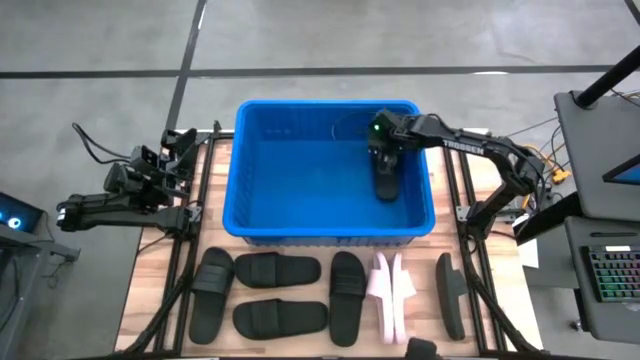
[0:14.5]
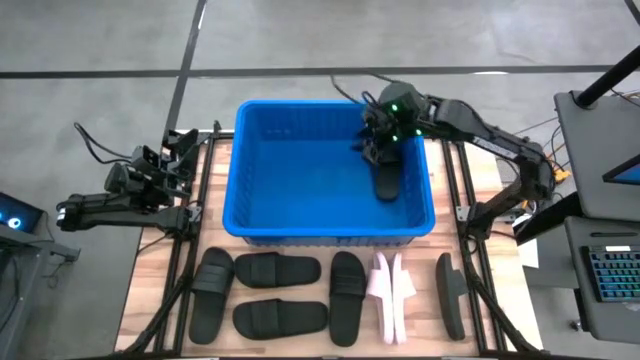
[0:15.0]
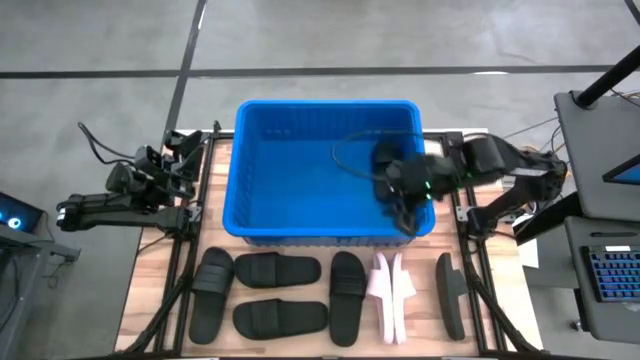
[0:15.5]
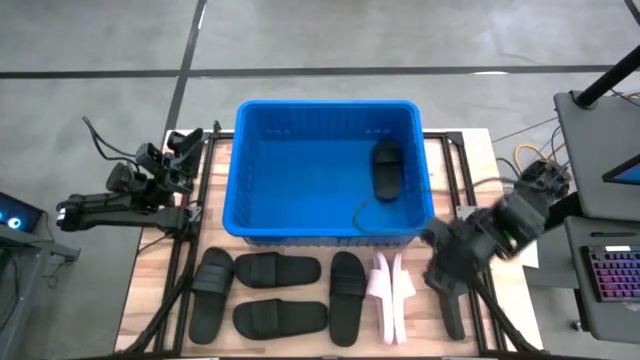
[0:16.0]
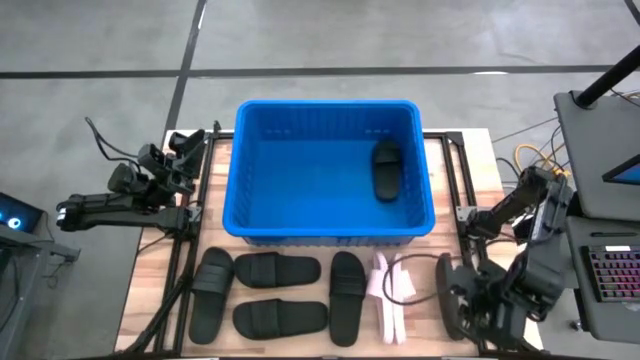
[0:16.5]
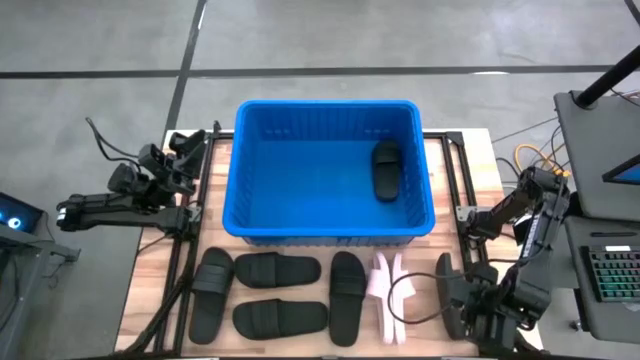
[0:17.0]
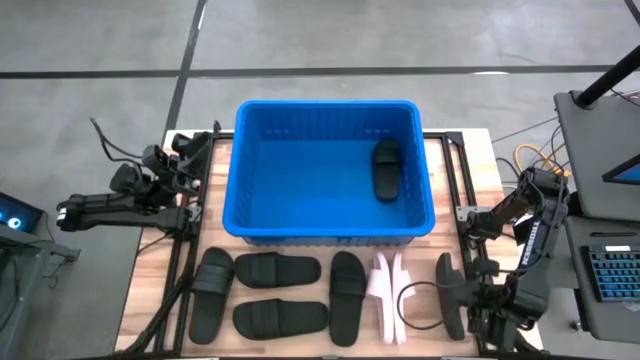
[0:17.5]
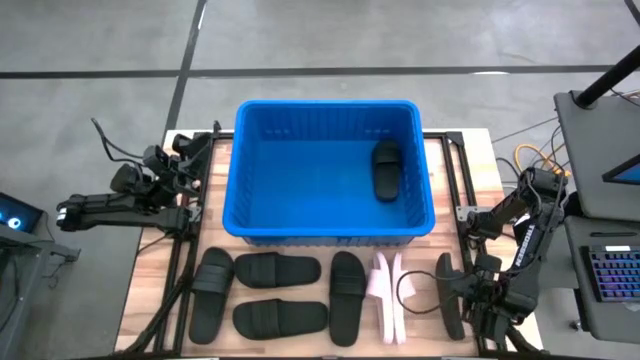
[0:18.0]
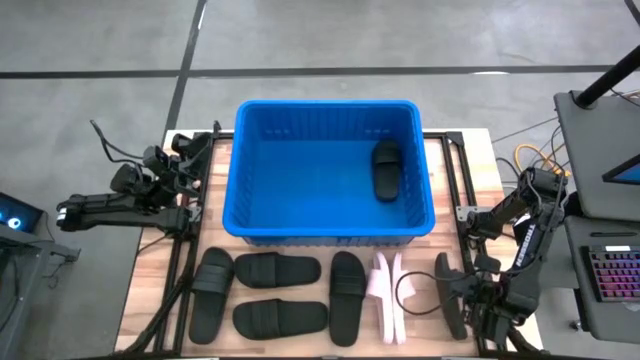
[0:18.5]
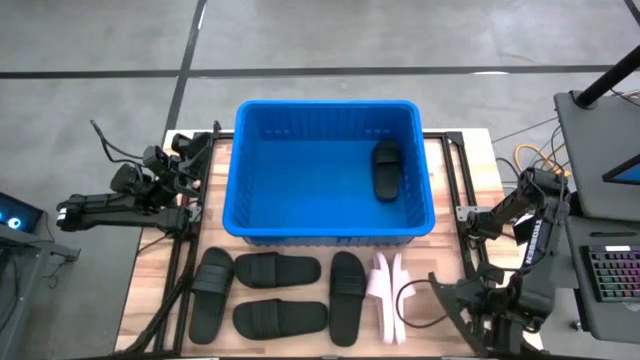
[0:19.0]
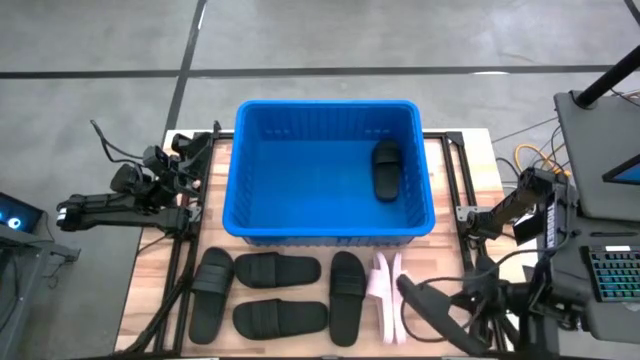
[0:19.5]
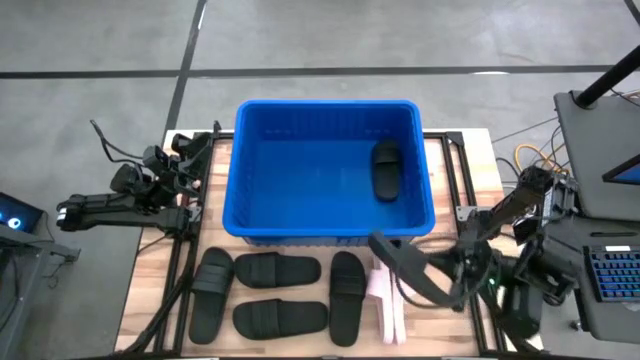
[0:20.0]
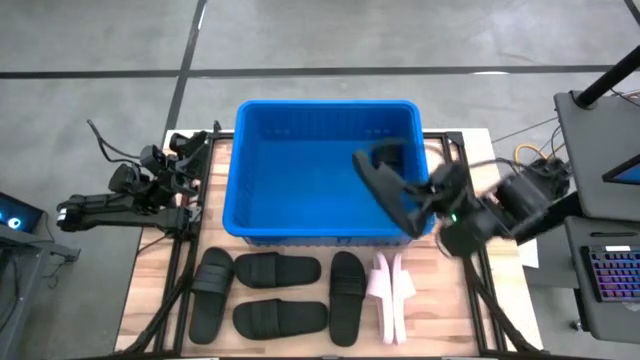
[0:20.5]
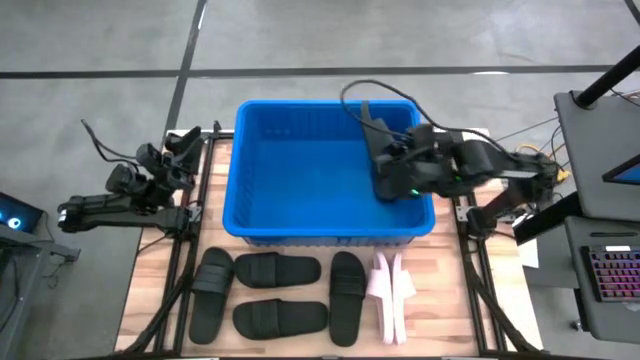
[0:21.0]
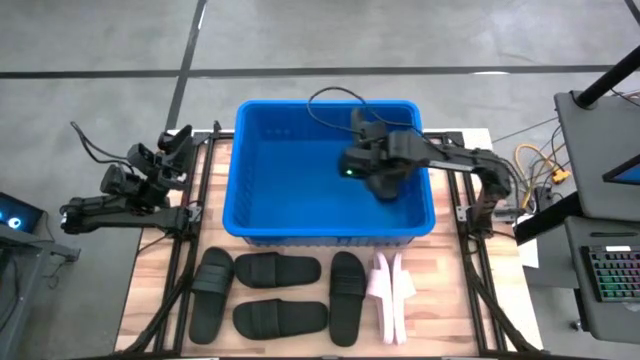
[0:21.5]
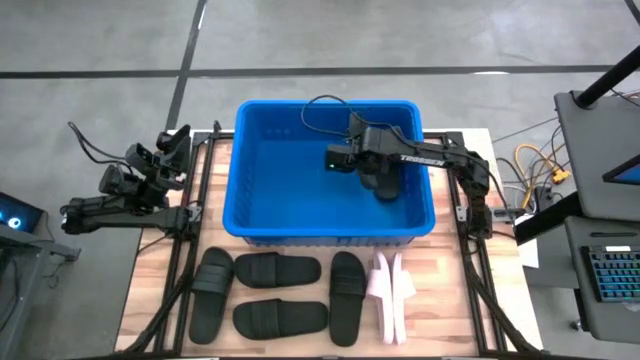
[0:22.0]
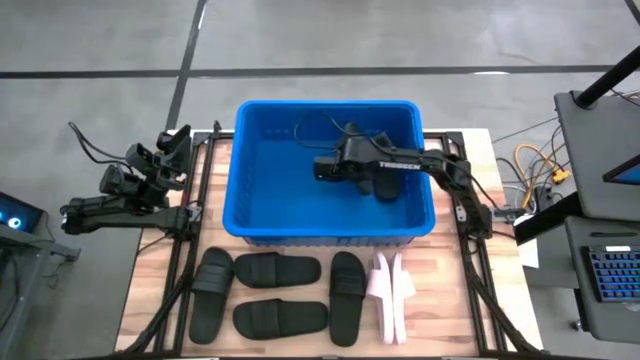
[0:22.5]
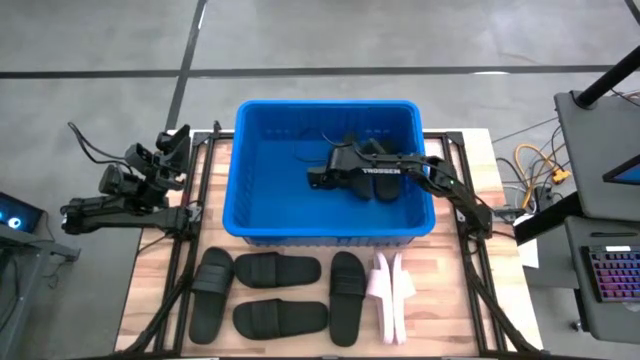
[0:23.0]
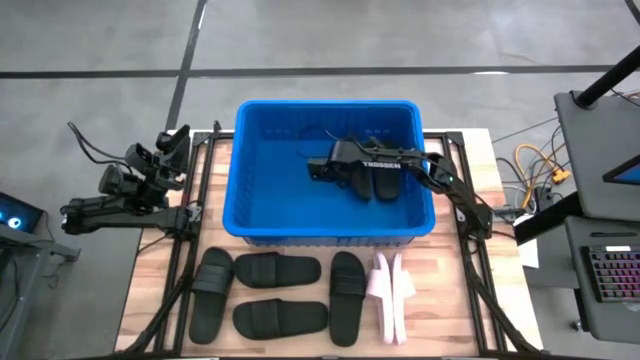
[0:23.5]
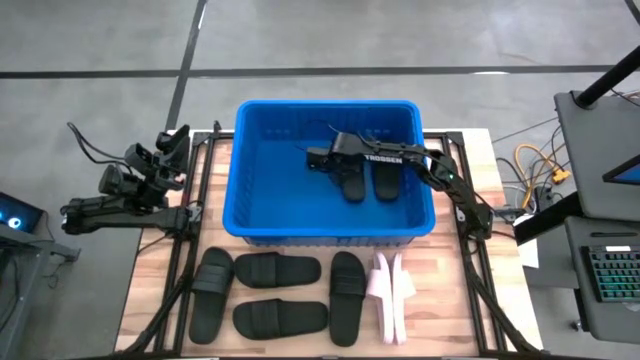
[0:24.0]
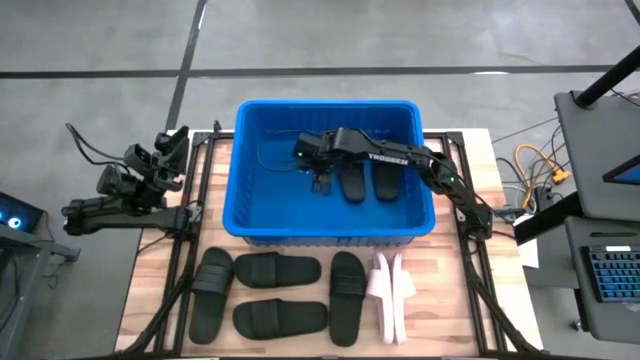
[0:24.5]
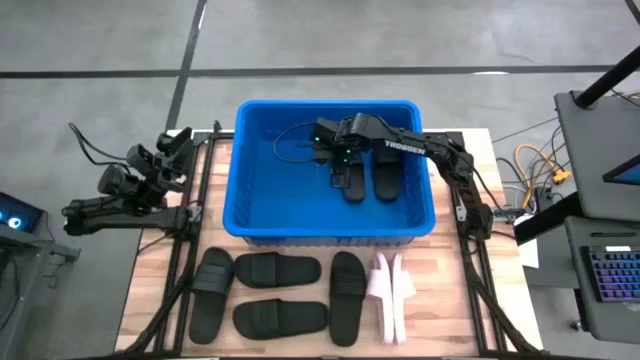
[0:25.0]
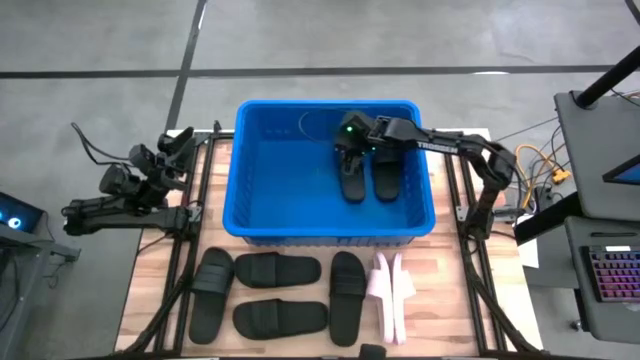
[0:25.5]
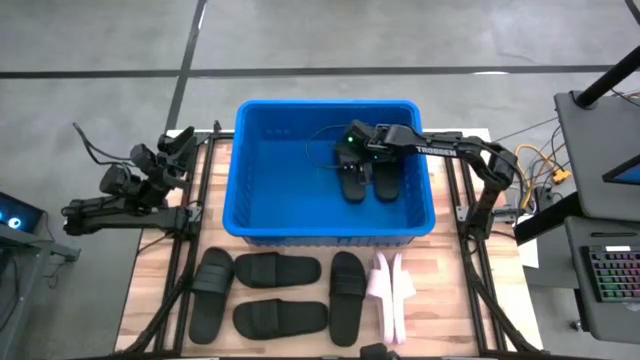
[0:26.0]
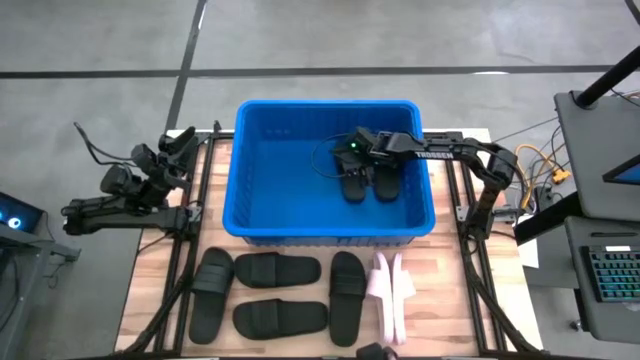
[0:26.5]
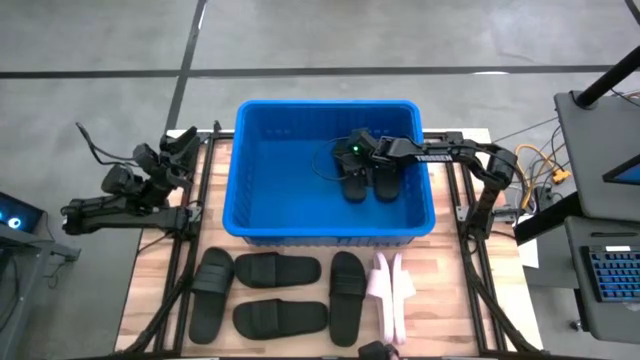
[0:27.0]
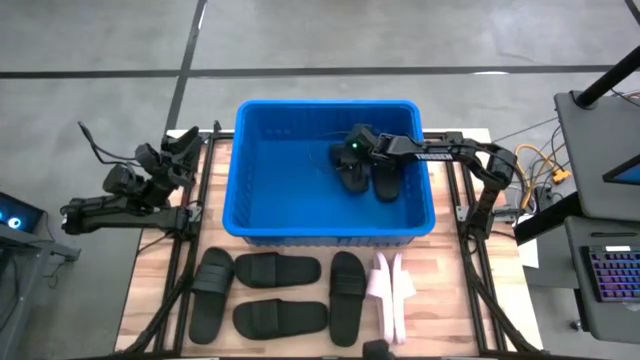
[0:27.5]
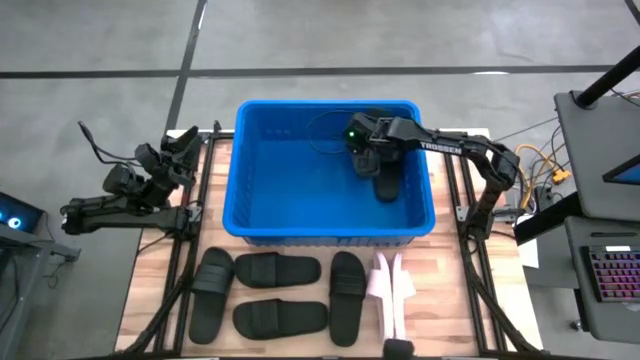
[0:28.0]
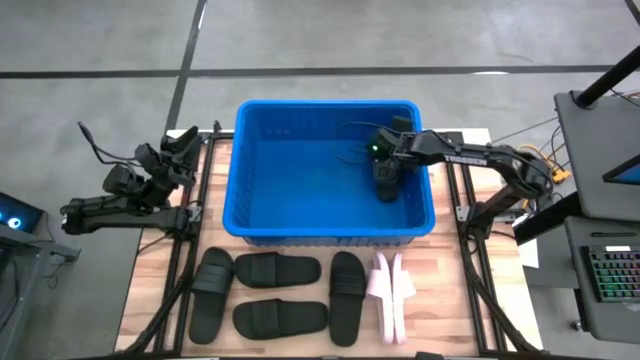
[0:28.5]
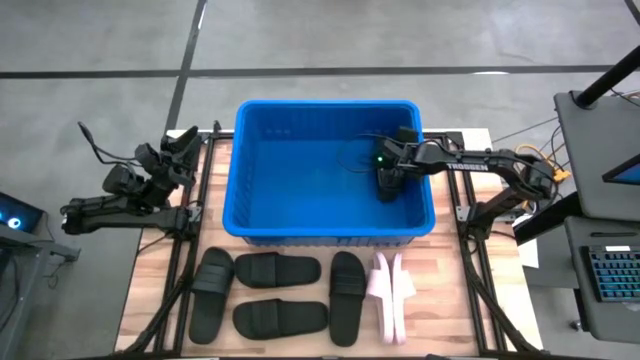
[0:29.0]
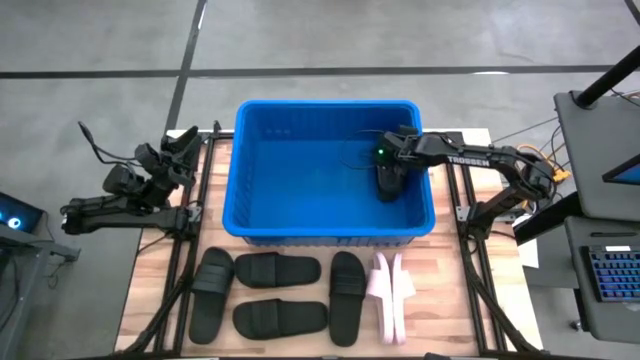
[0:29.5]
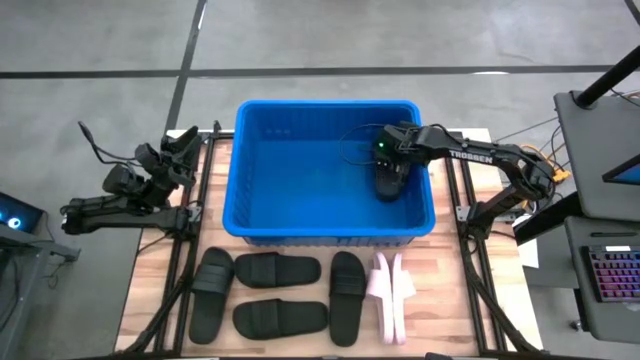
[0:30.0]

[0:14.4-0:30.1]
Task: Pick and place slides into bin
Put the black slide into the blue bin

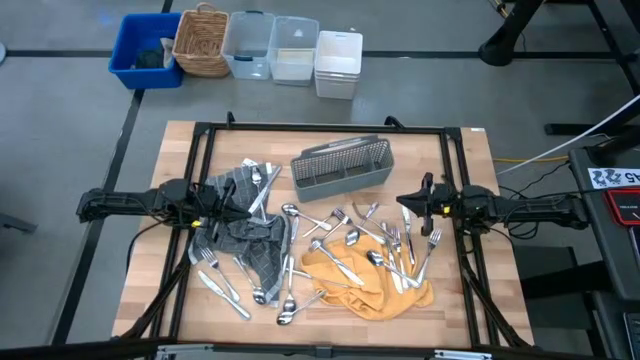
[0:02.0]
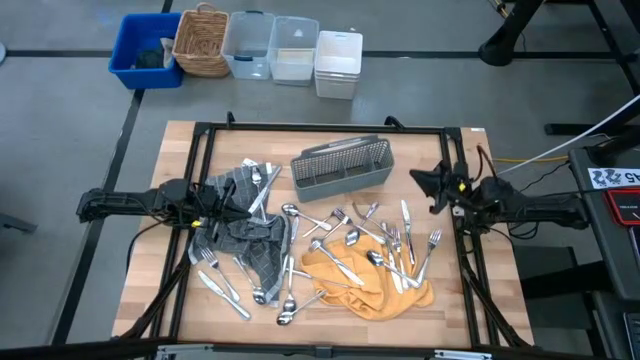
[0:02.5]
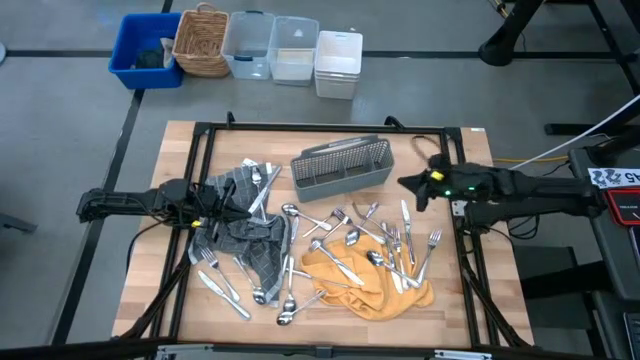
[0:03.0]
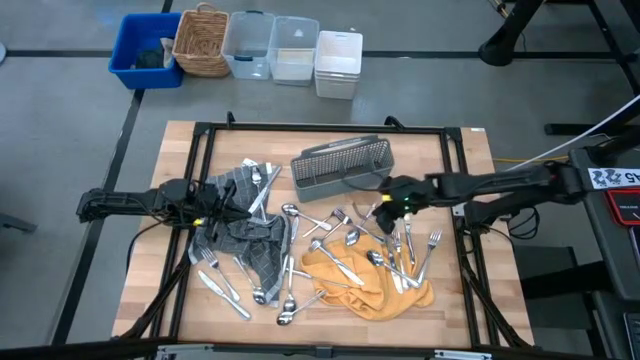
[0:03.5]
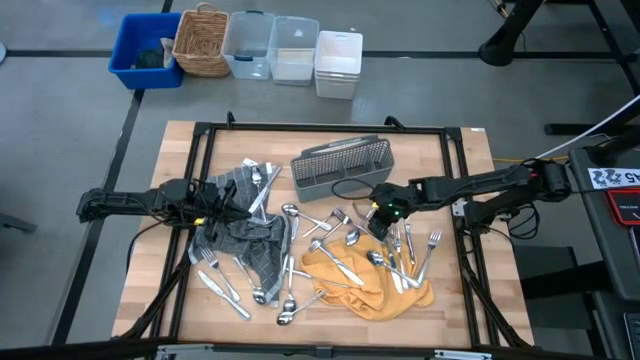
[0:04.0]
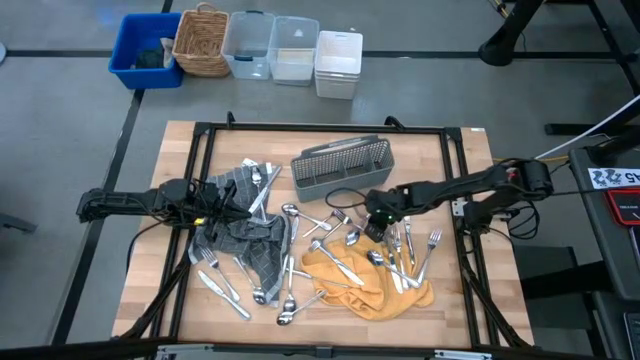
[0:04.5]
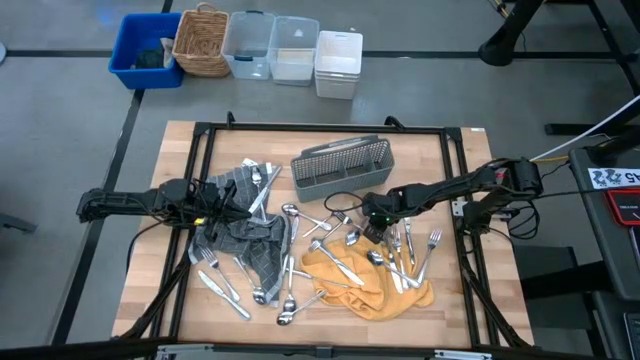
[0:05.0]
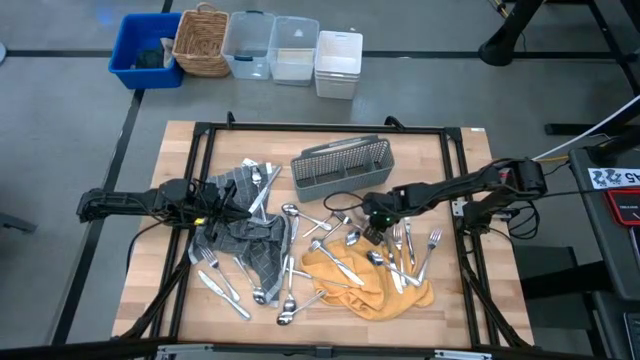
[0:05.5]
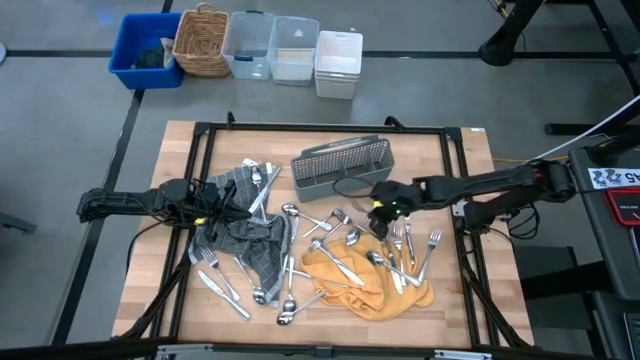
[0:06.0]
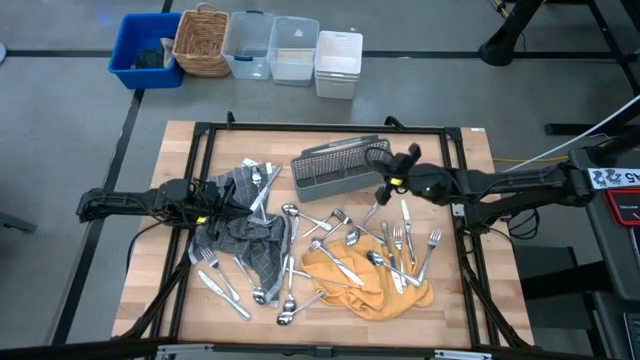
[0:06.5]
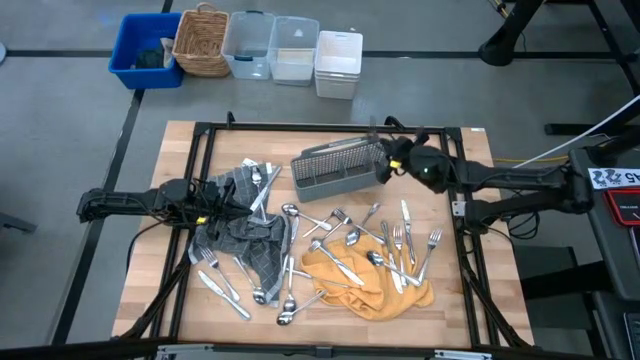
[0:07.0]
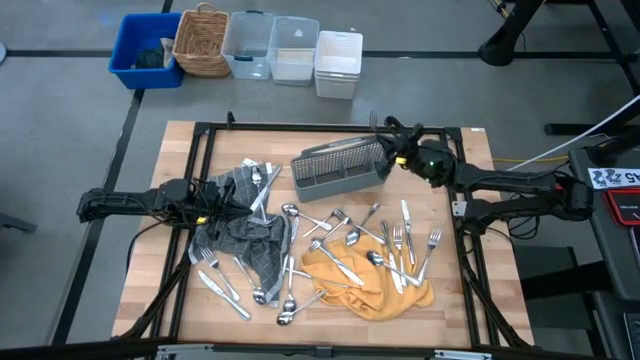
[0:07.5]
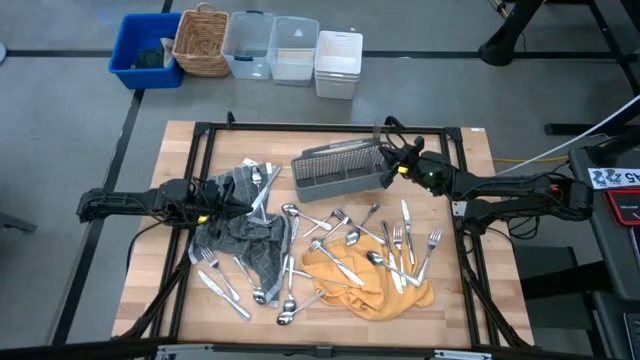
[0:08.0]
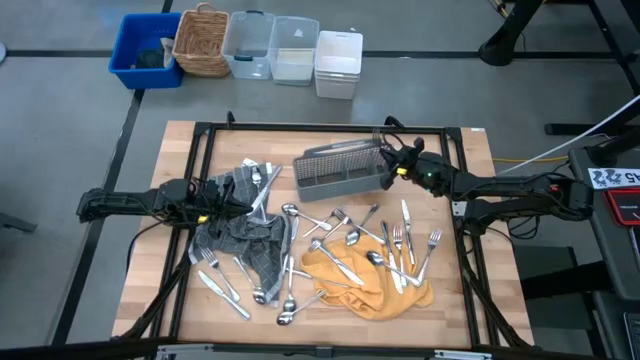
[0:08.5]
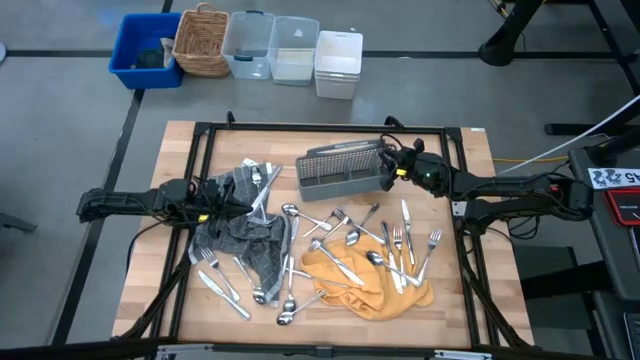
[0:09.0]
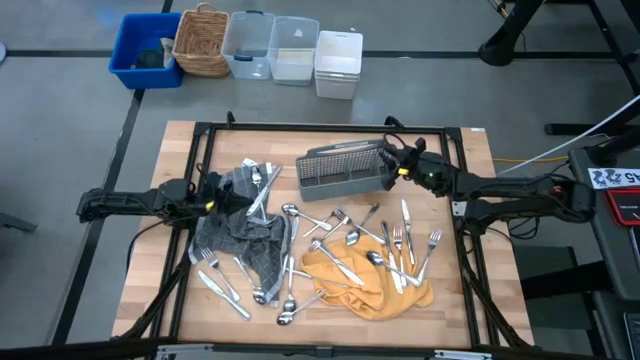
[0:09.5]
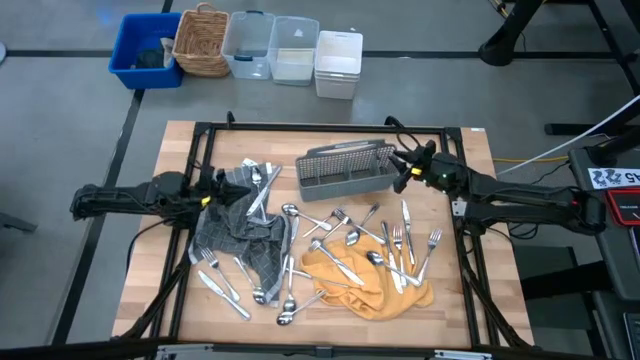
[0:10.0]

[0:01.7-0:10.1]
Task: Sort silverware
Put the silver fork into the gray utensil holder
